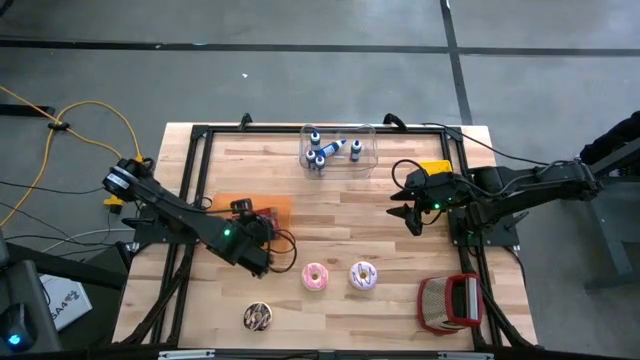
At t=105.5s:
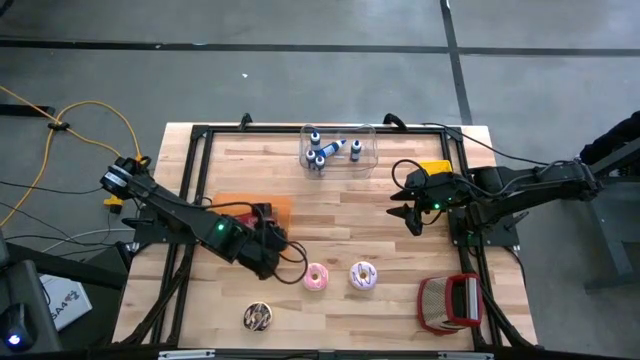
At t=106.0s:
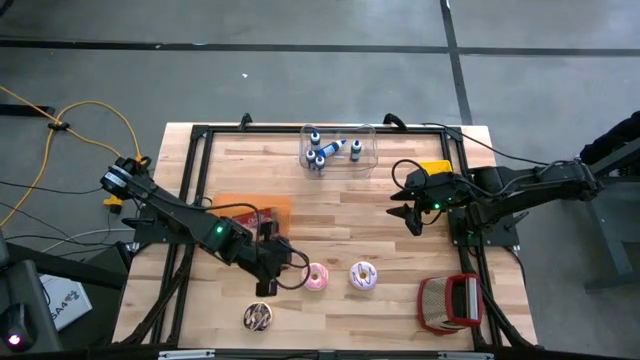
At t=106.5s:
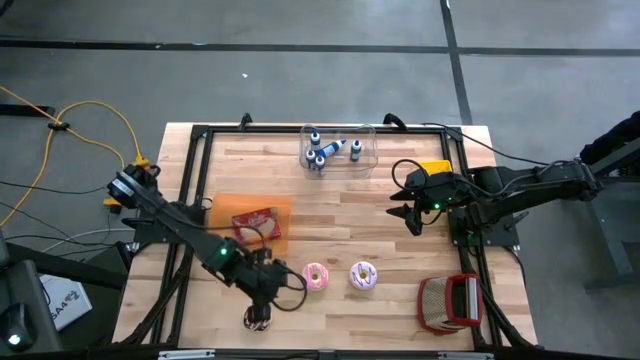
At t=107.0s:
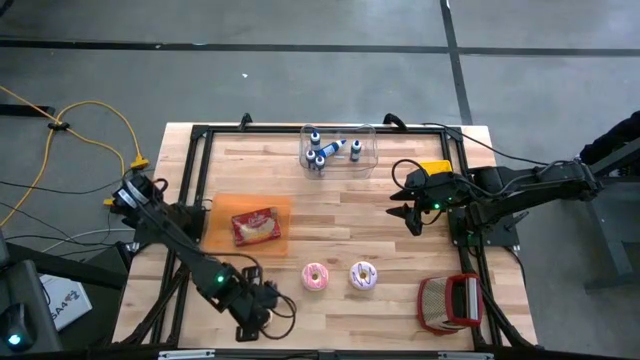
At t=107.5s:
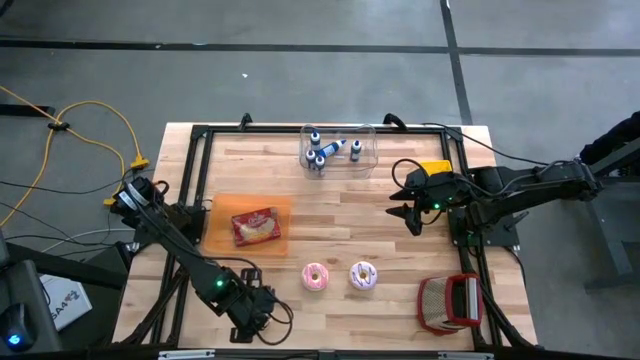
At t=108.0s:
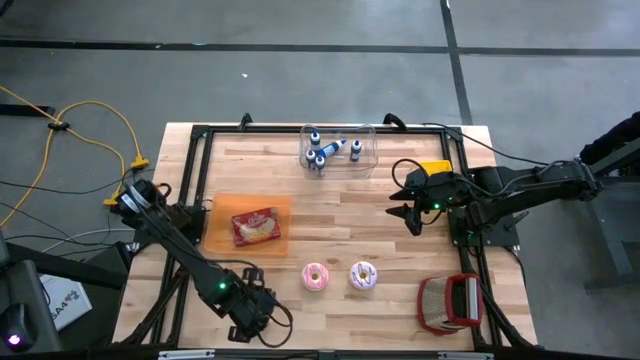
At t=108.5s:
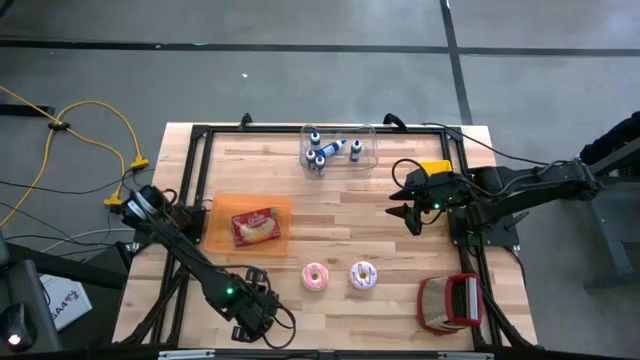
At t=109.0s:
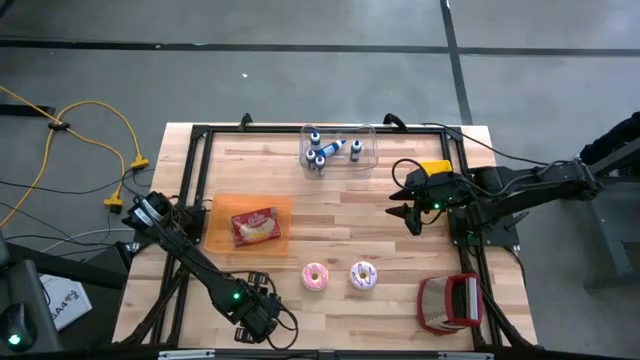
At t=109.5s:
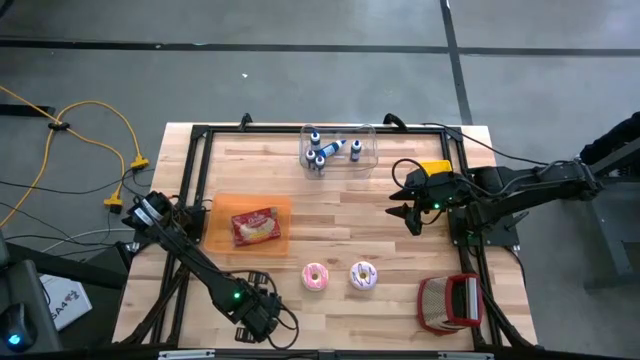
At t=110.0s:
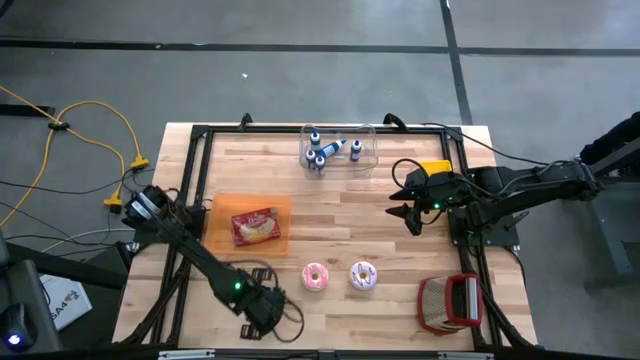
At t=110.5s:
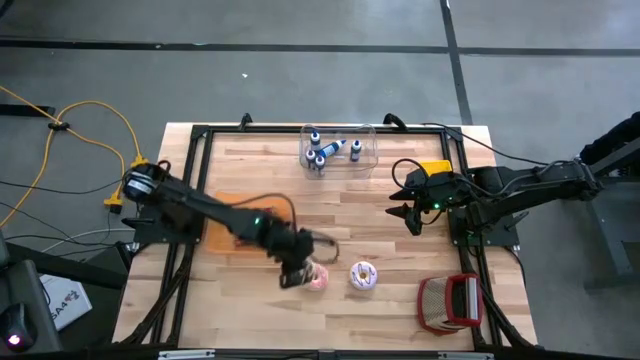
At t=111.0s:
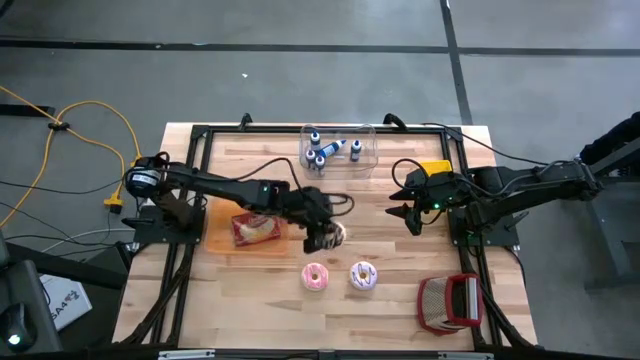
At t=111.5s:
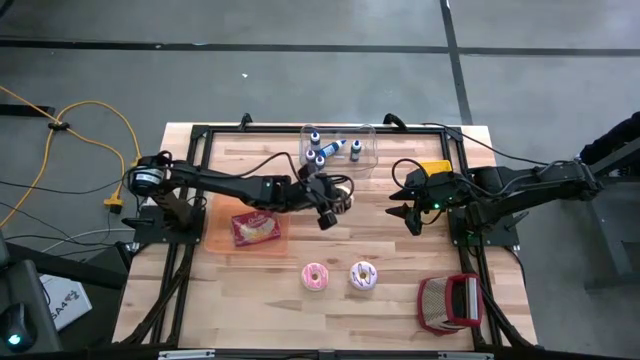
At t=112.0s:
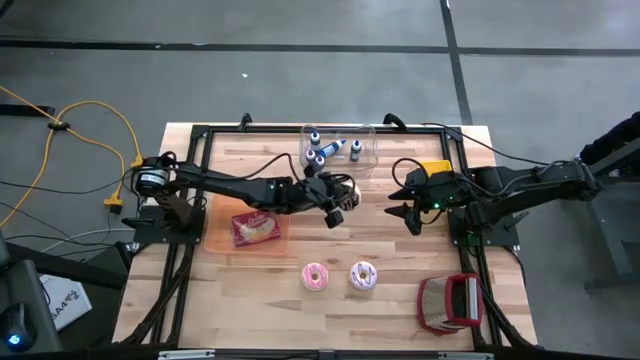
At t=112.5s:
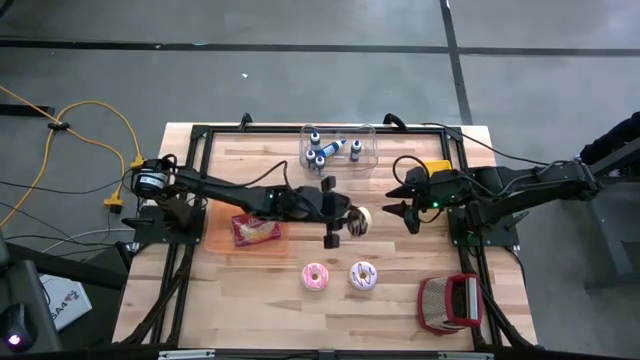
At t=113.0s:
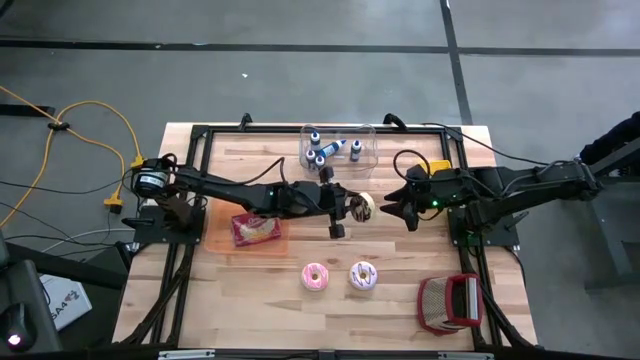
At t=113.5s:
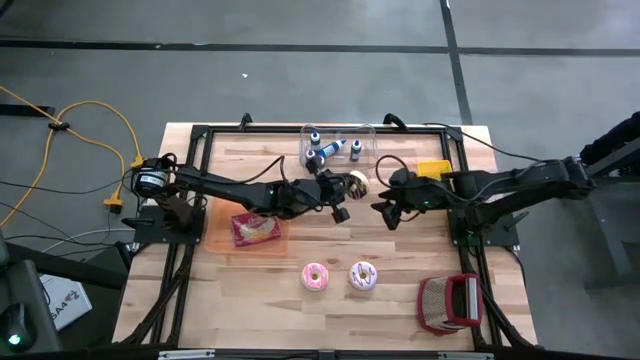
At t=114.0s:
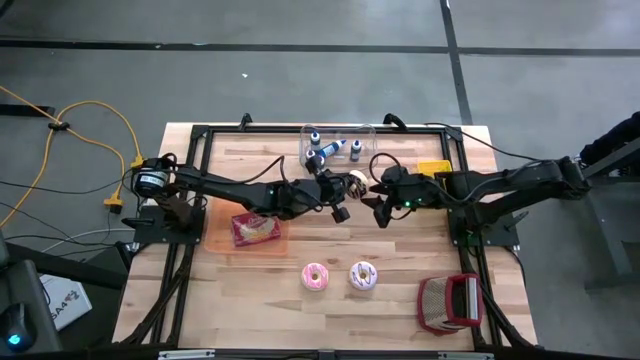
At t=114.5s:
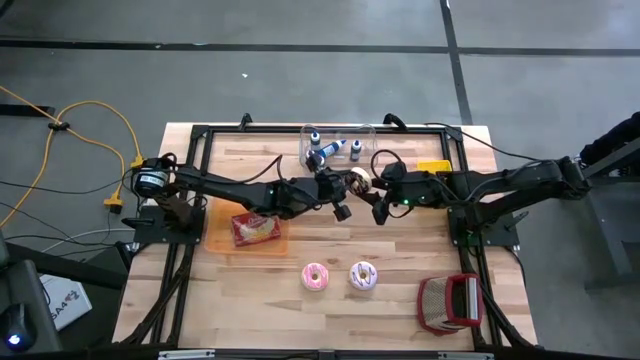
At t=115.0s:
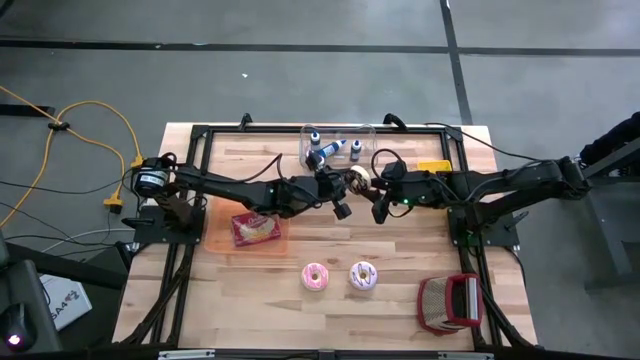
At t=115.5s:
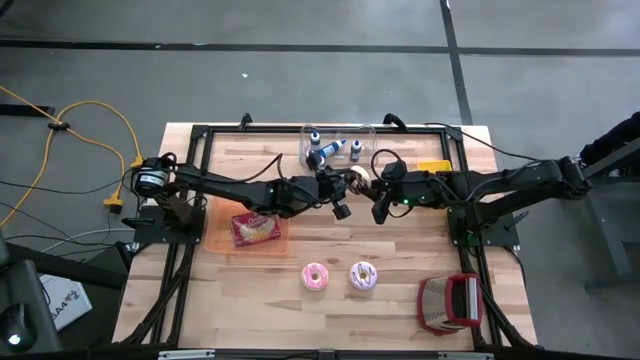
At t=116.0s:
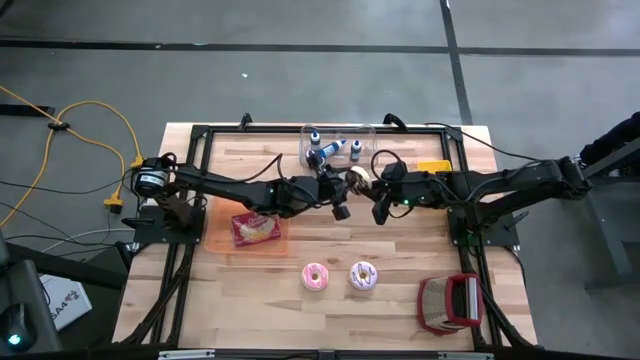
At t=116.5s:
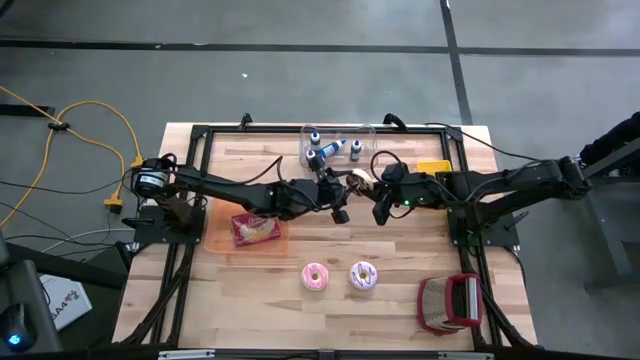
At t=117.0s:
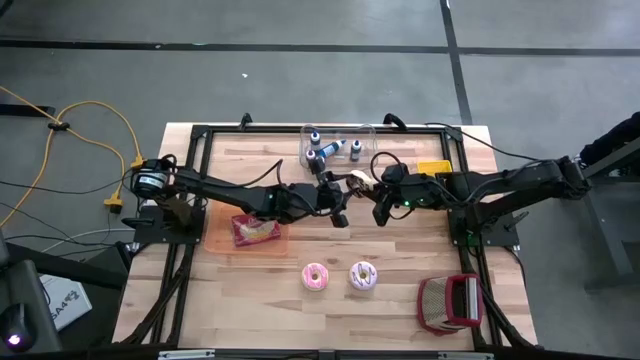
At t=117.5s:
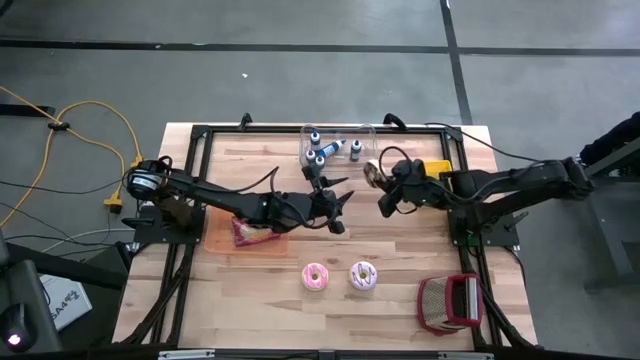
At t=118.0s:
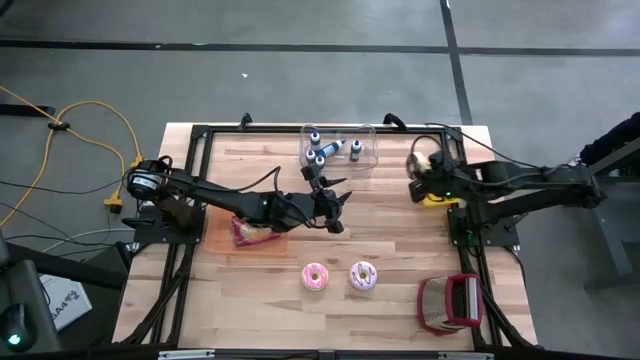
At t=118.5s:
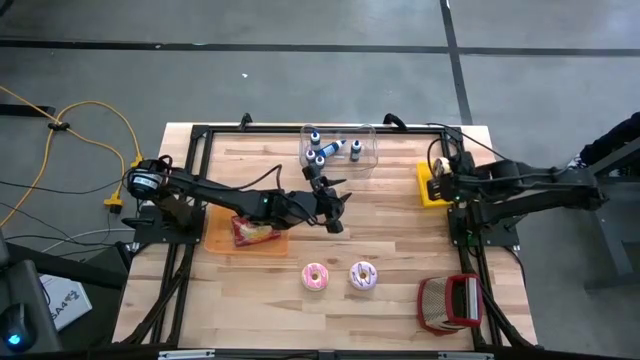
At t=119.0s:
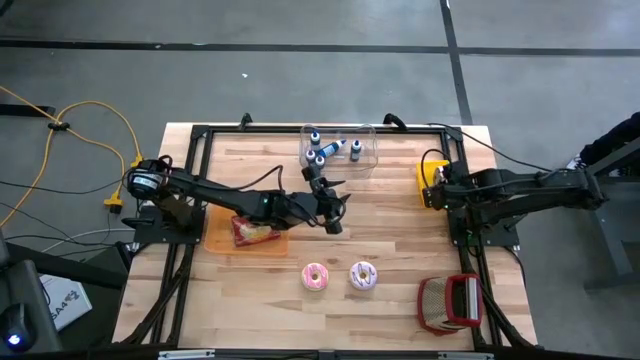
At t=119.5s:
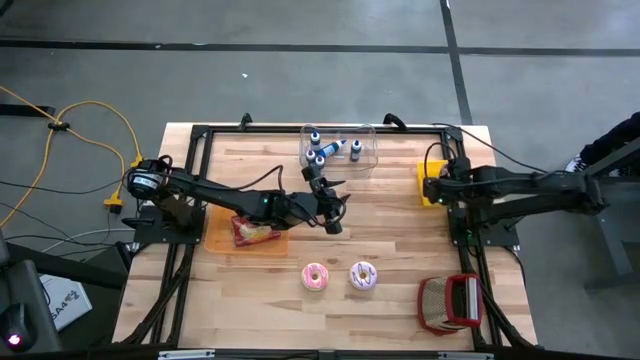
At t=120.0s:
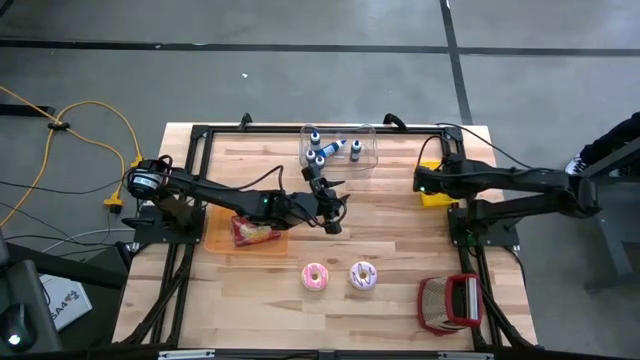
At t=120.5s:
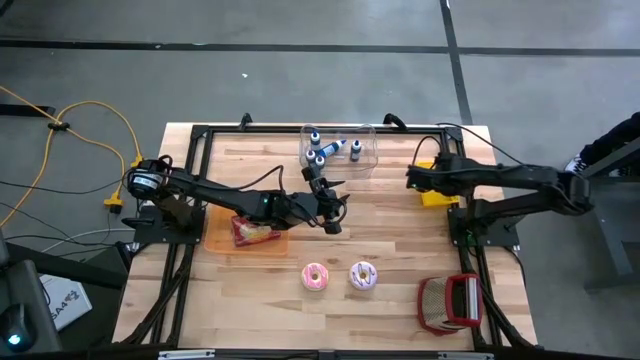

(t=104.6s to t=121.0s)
Put the brown donut into the yellow bin

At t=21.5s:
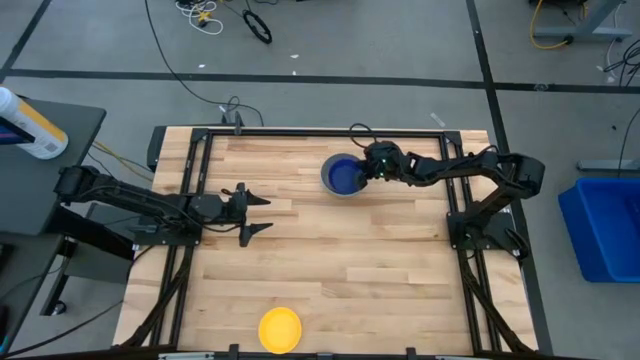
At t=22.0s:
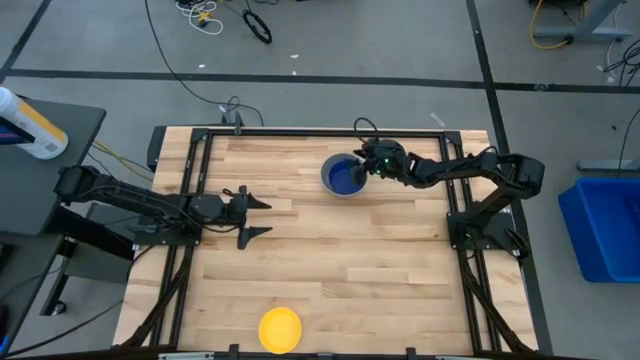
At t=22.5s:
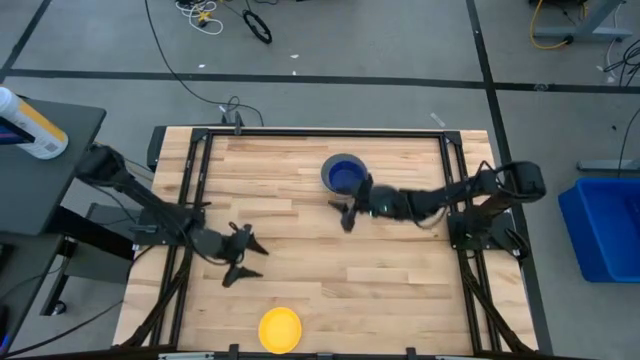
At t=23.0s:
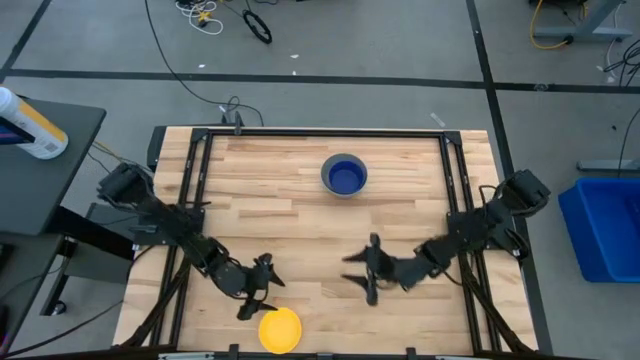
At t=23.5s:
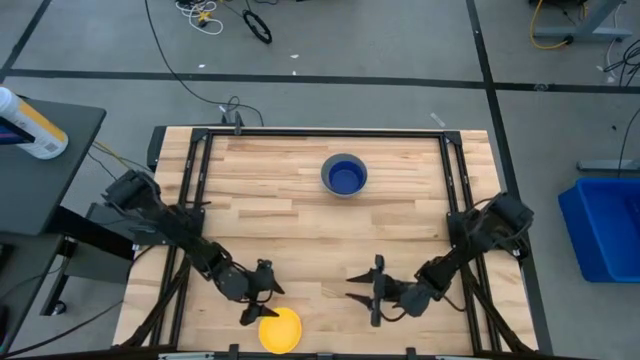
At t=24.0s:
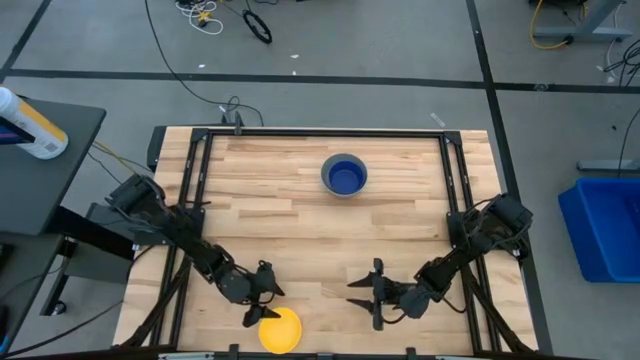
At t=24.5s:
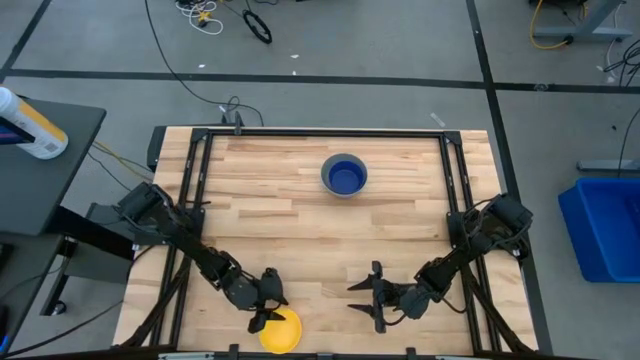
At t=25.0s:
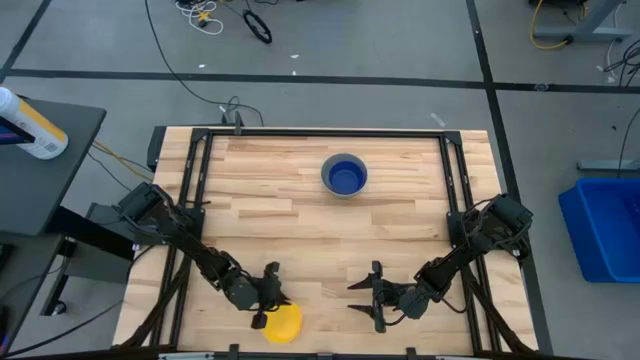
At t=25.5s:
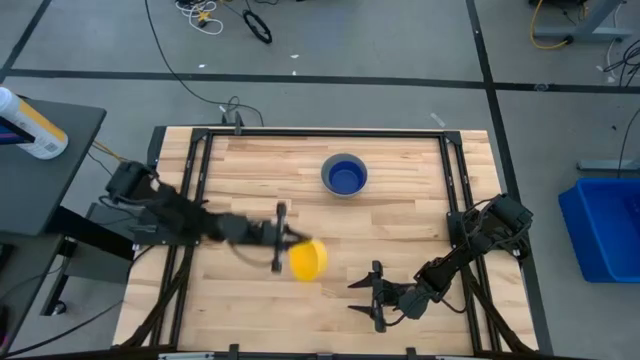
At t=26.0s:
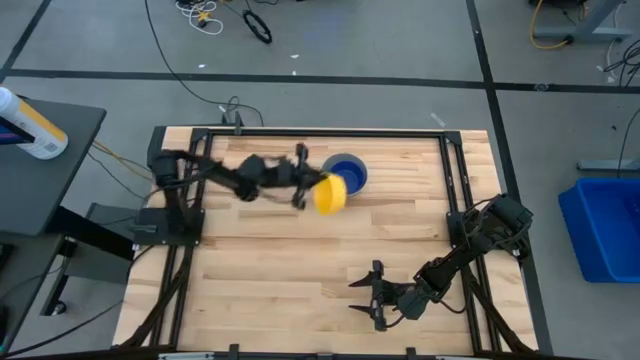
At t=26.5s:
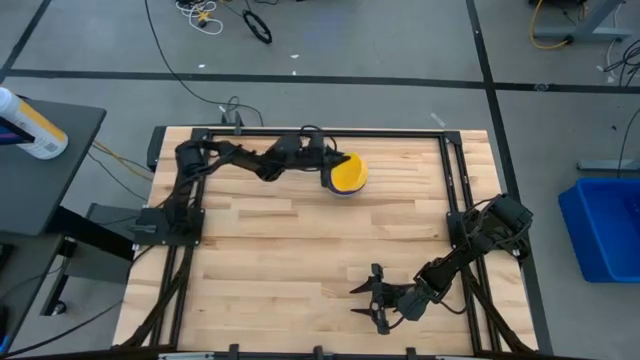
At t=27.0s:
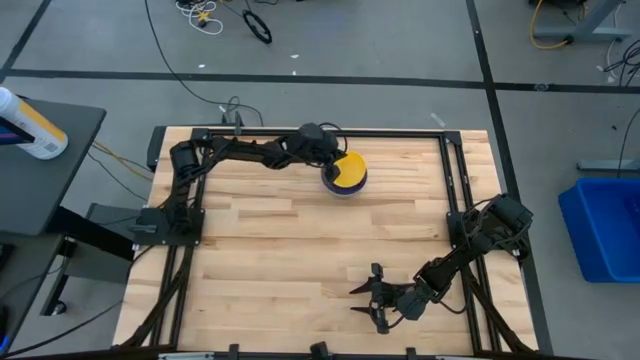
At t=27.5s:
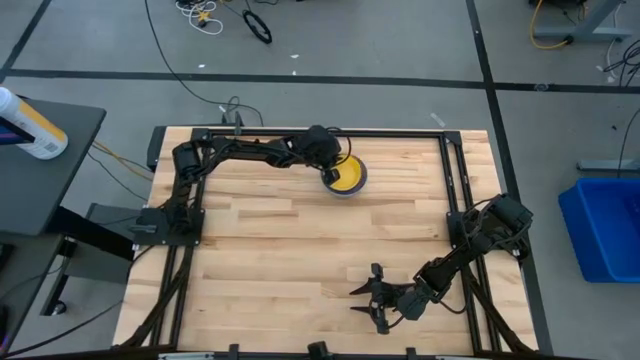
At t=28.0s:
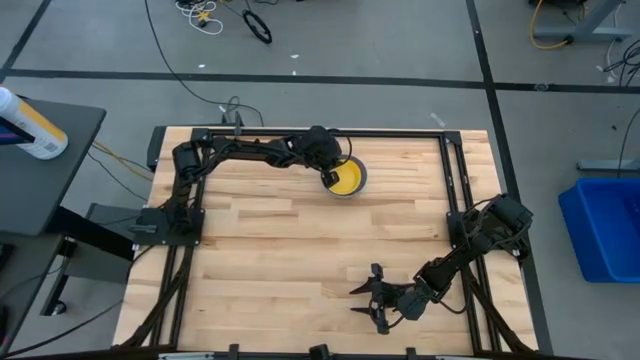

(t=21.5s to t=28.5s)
Stack the yellow bowl in the dark blue bowl
